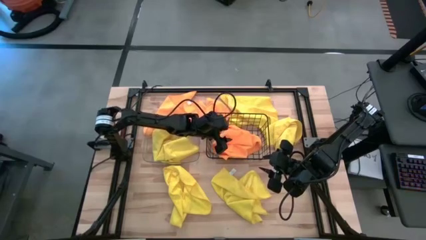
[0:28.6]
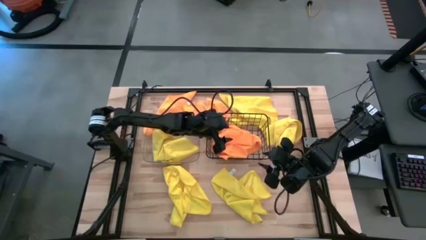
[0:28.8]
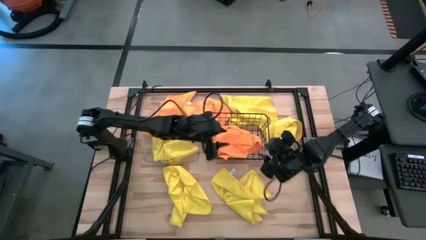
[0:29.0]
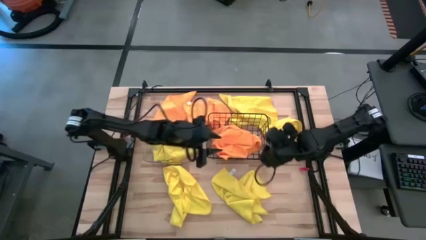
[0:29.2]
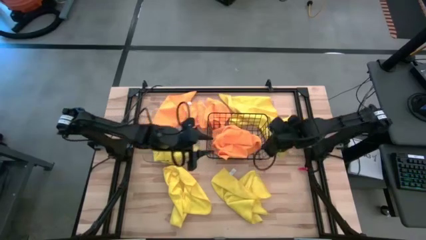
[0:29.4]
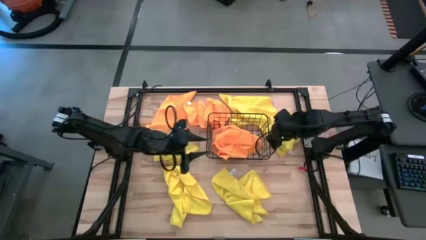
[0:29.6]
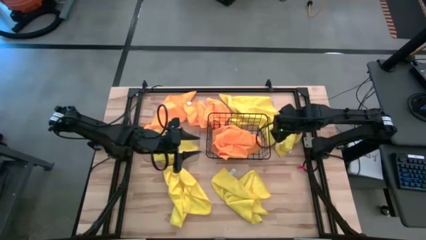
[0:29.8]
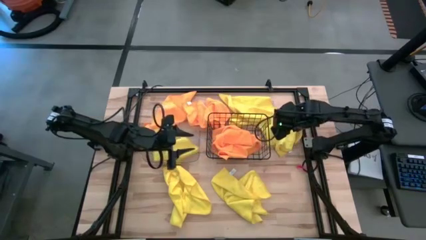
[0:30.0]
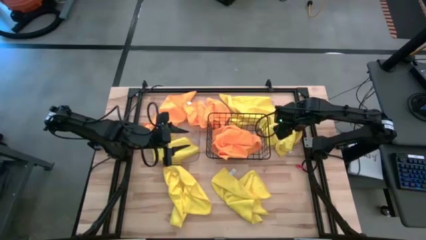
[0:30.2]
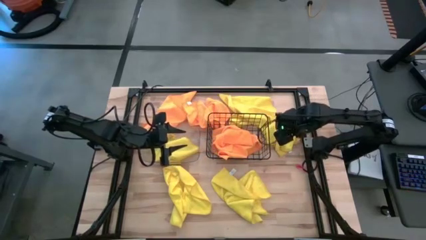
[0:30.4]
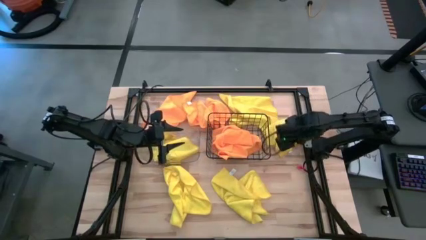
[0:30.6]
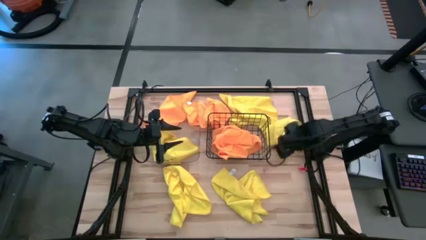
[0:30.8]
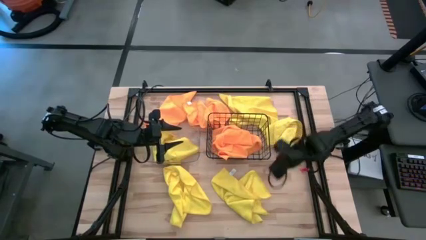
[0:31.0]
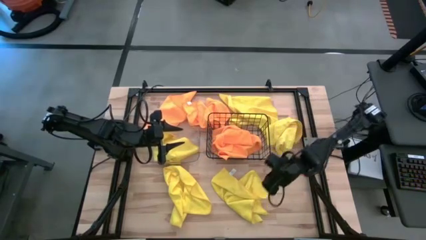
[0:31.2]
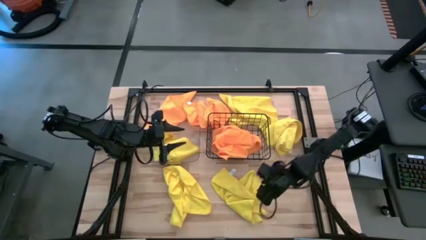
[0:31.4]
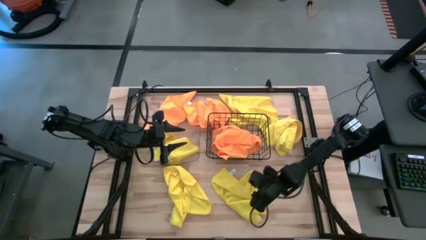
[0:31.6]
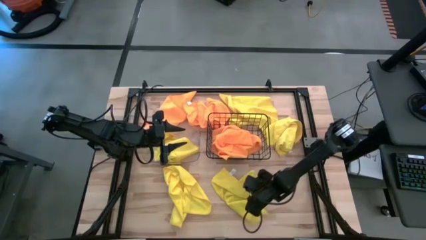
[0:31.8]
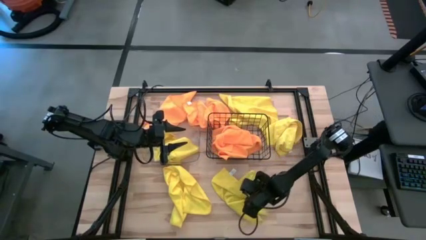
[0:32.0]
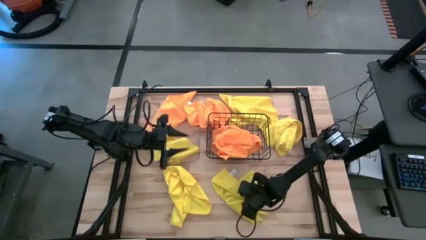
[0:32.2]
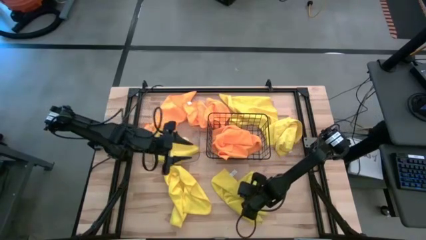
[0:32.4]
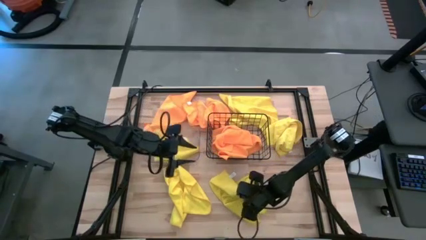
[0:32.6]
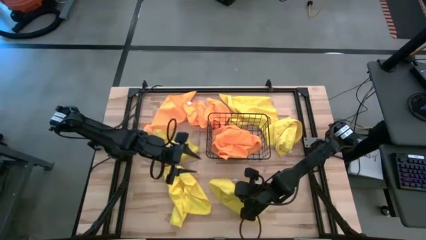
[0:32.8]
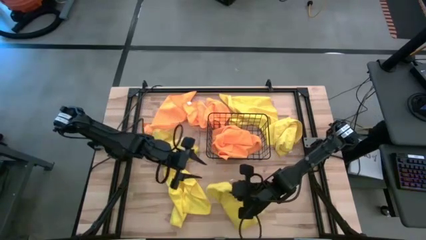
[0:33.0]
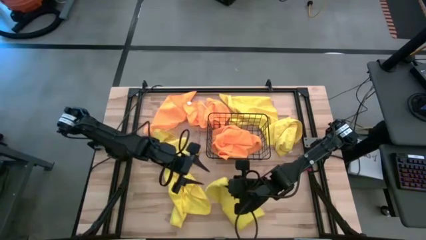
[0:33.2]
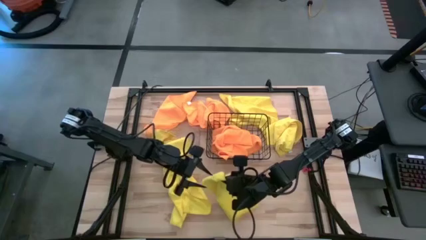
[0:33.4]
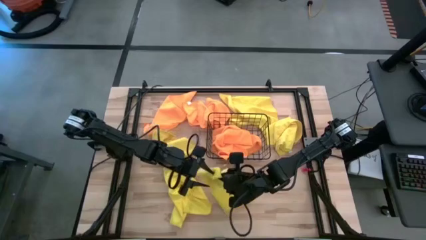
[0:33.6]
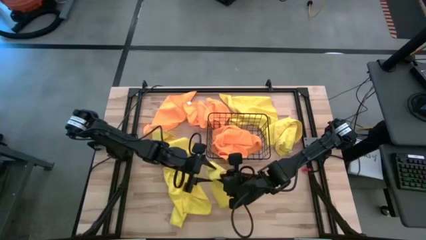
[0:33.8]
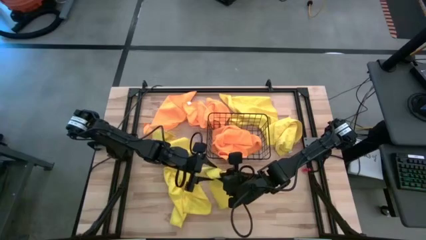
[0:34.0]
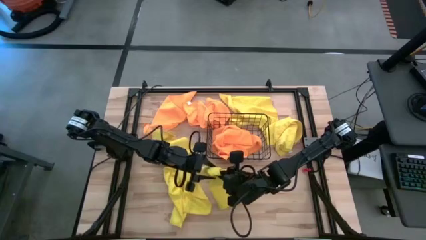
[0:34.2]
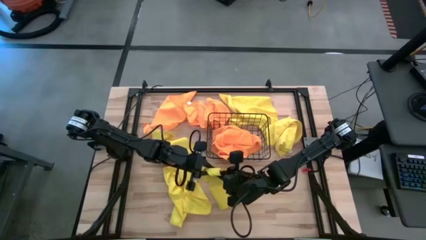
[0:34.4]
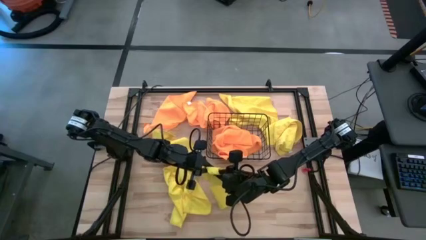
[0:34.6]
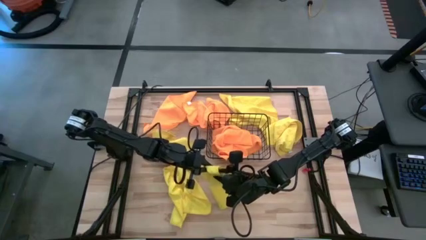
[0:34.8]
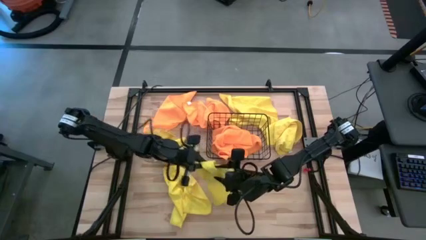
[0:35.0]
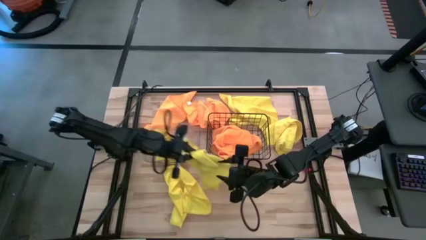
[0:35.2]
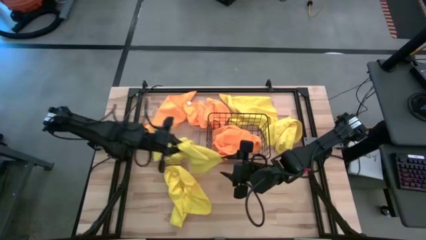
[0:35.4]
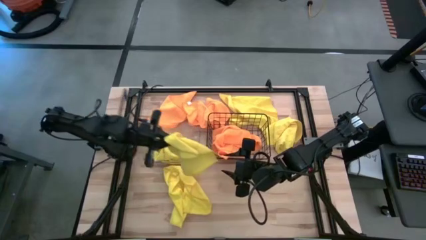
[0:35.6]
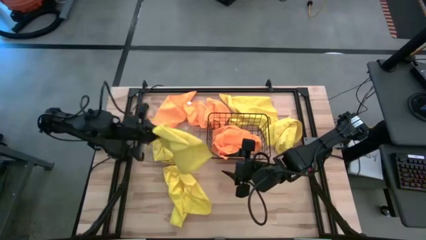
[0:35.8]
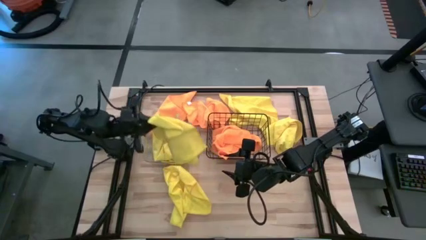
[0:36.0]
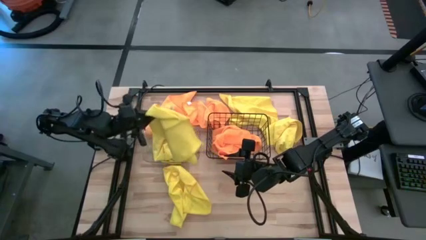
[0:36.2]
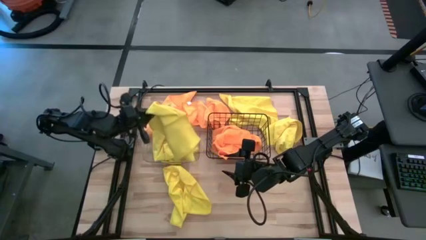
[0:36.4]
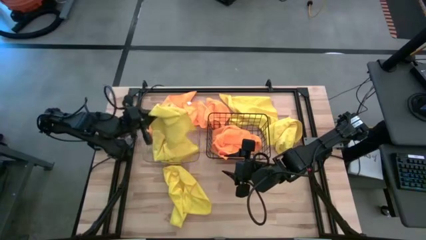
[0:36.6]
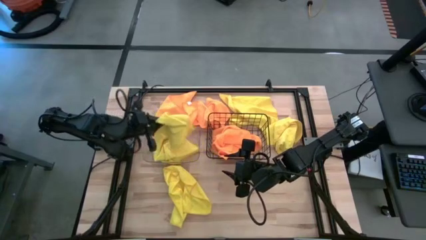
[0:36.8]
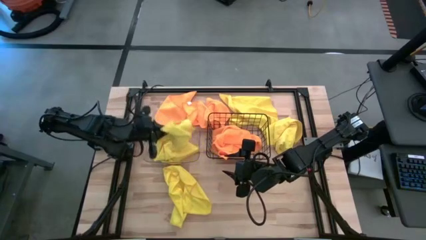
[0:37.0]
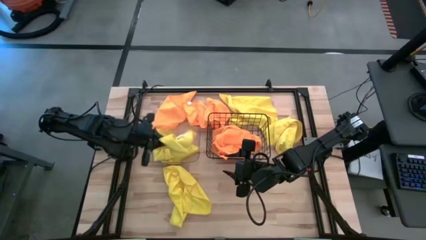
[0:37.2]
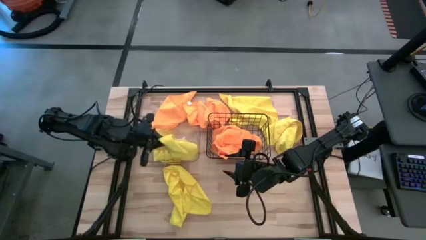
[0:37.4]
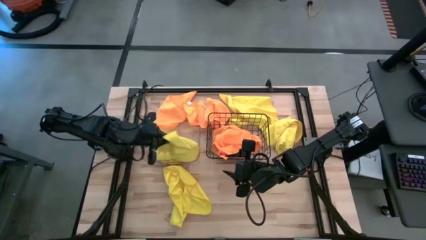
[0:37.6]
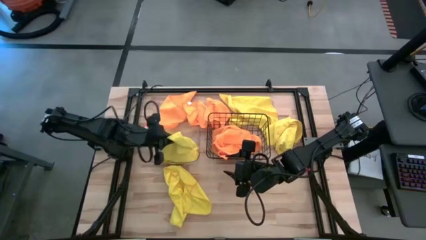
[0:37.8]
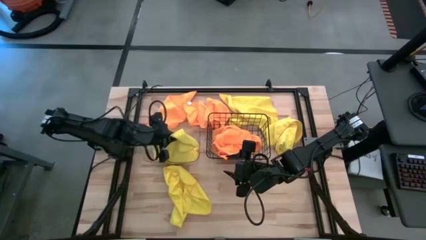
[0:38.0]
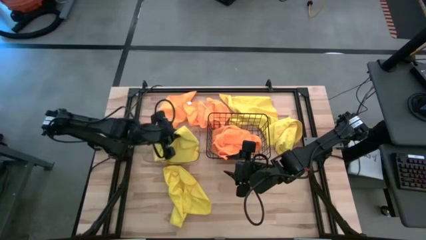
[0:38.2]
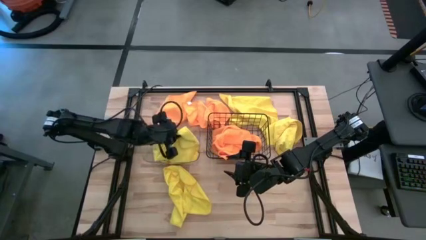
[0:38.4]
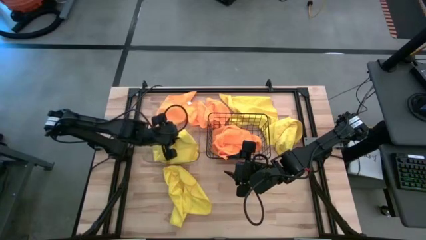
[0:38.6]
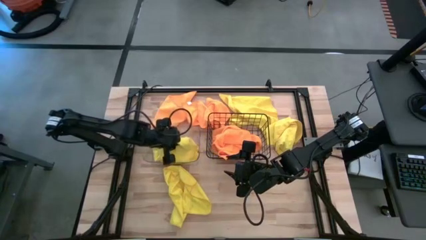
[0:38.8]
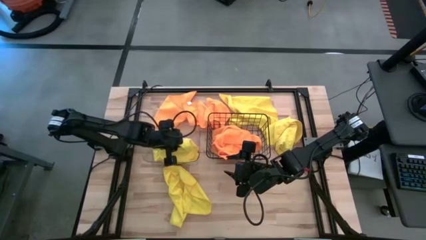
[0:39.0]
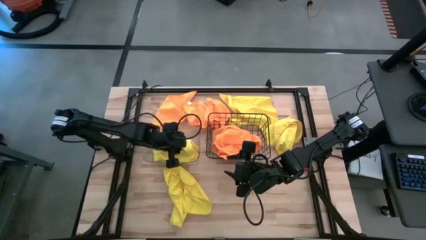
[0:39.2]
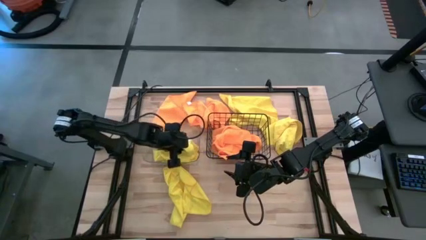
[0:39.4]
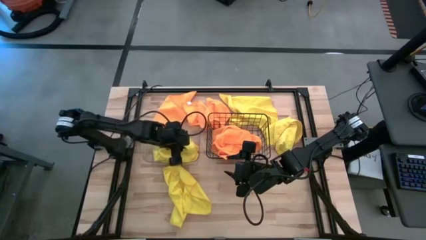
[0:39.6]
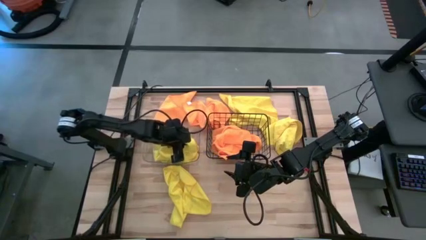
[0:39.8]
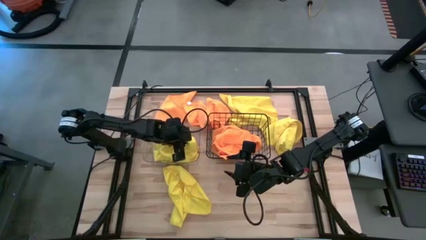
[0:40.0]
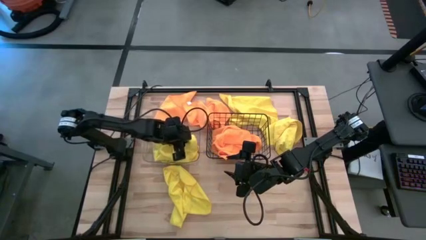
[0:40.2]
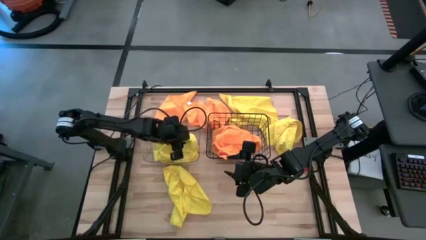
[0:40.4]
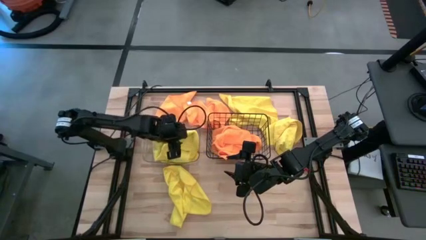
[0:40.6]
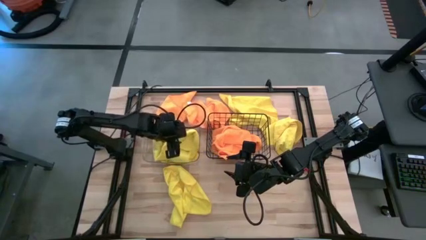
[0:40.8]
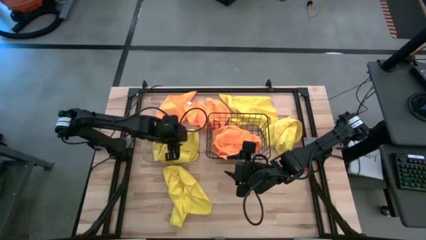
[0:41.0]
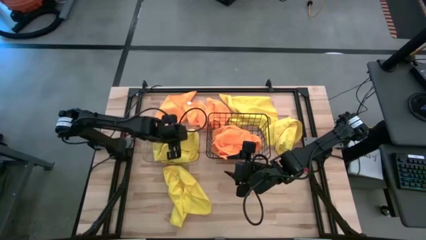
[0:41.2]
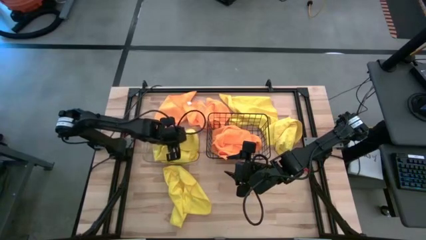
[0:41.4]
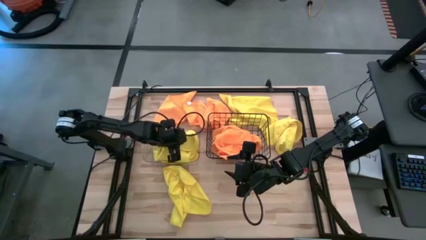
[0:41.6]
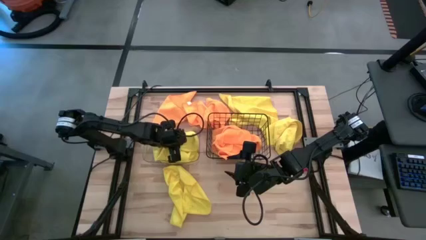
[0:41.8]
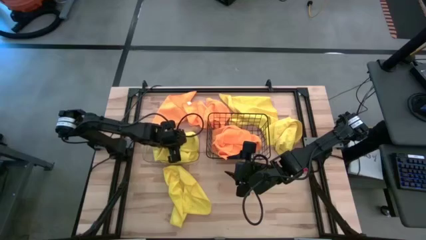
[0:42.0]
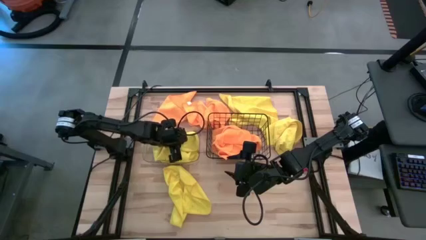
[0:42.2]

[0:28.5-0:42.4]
Task: Sort microfiber towel by color & place in baskets
Put the yellow towel into the transparent bin

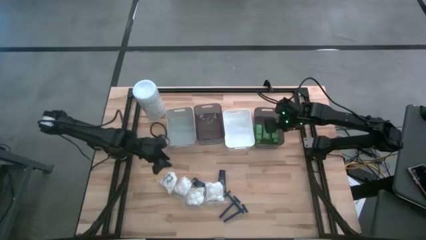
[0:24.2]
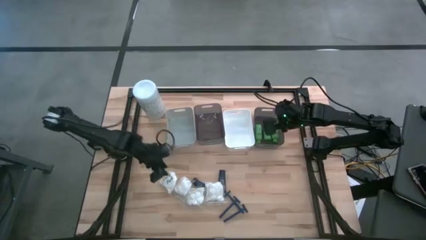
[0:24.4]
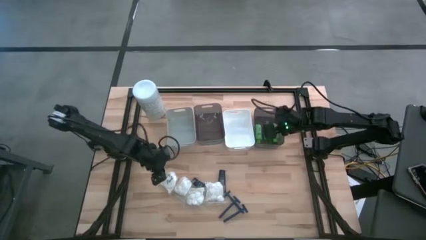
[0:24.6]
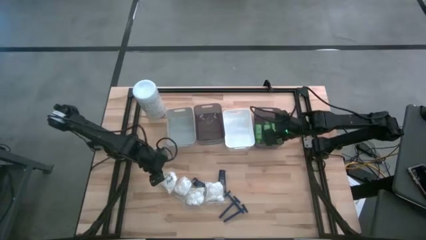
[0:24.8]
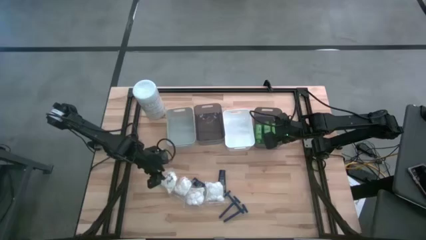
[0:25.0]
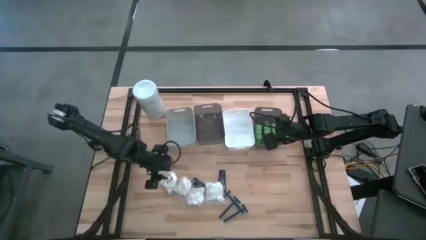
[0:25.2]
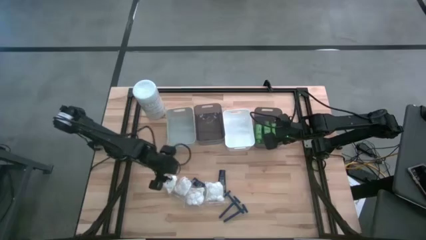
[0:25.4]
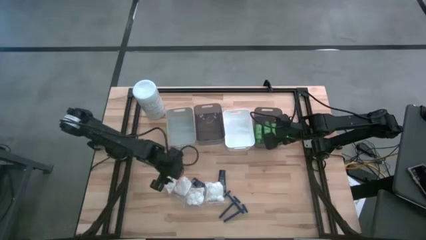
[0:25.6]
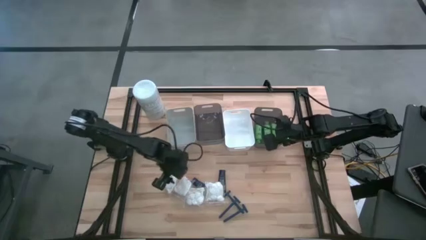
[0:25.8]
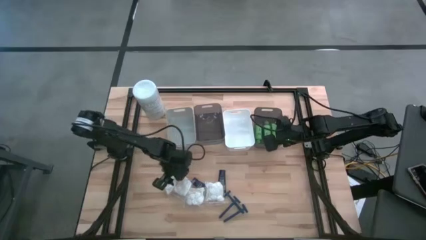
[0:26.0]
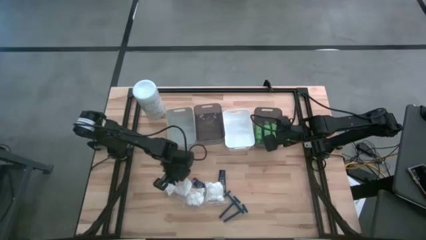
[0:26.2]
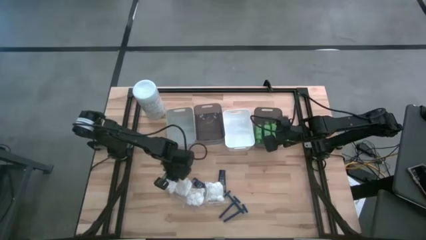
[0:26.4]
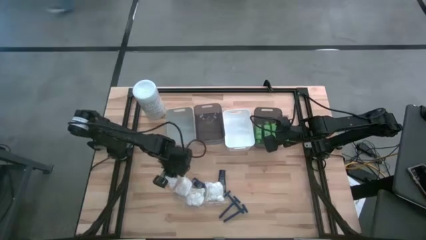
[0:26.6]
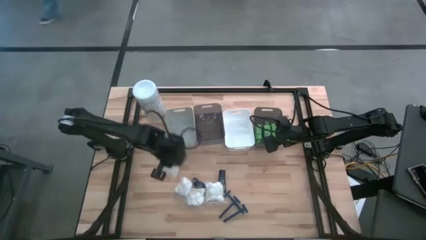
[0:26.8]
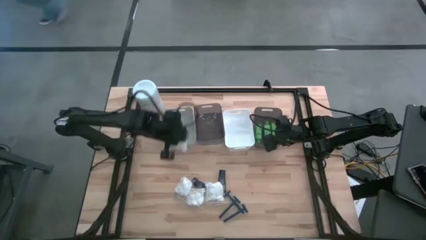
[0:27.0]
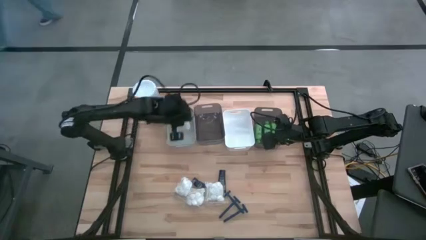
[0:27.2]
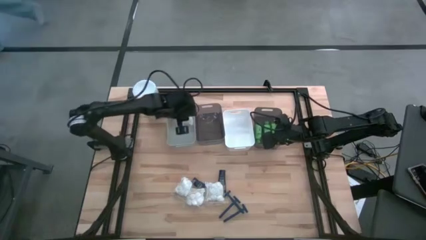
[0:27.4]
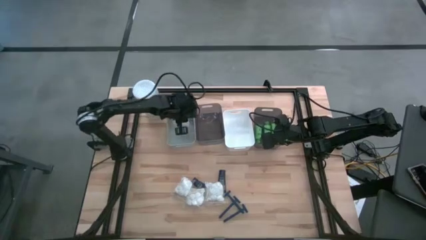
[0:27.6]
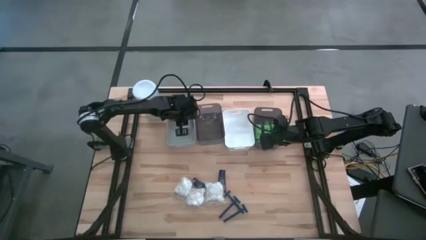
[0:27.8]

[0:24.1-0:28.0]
Task: Pick & Place Travel size toiletries
Put the left cotton pack in the left white bin
